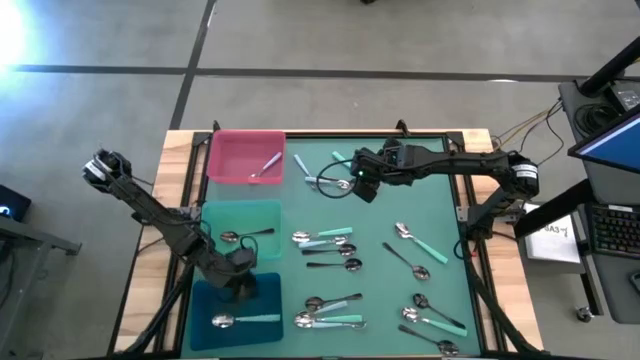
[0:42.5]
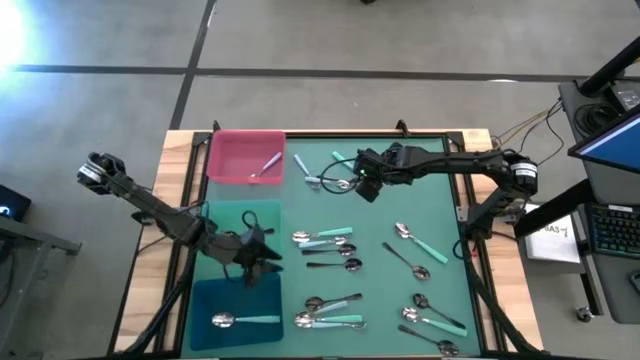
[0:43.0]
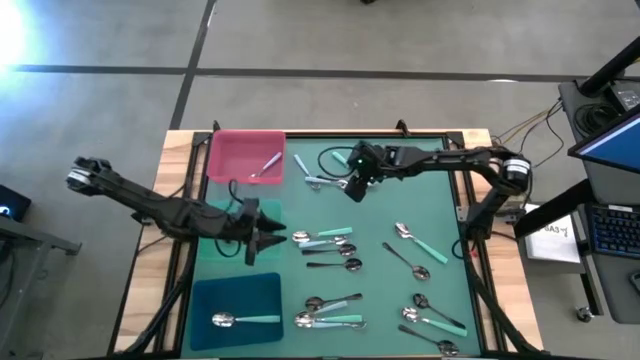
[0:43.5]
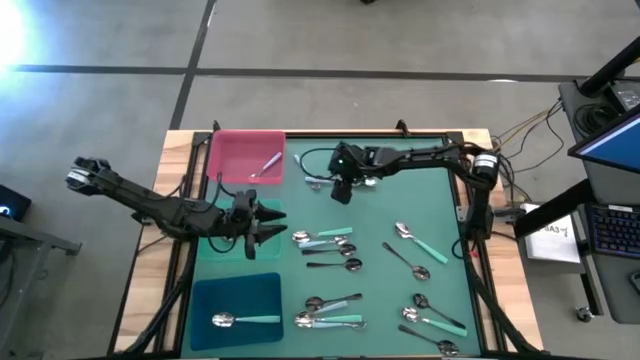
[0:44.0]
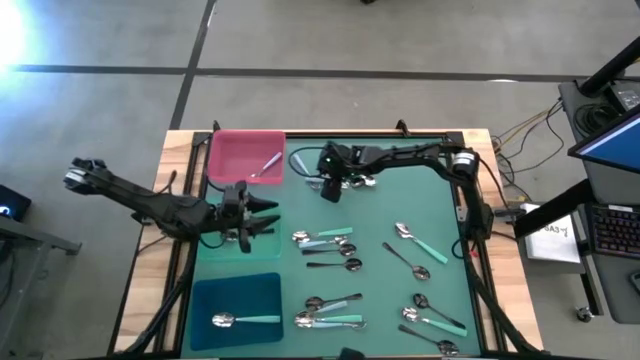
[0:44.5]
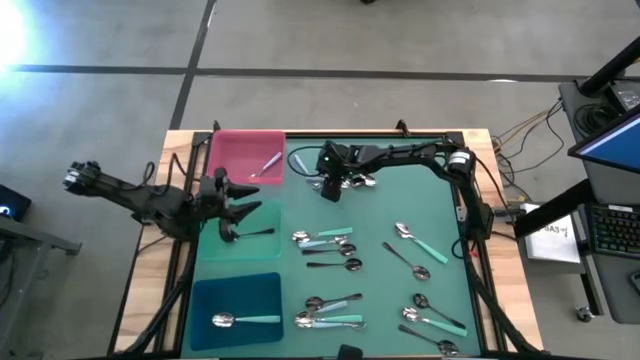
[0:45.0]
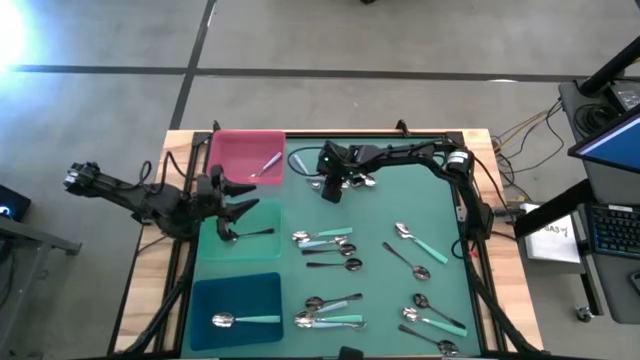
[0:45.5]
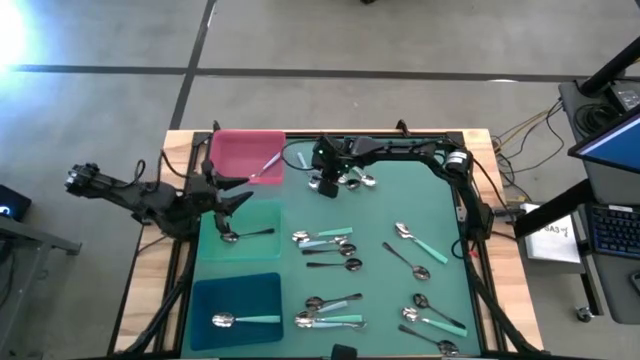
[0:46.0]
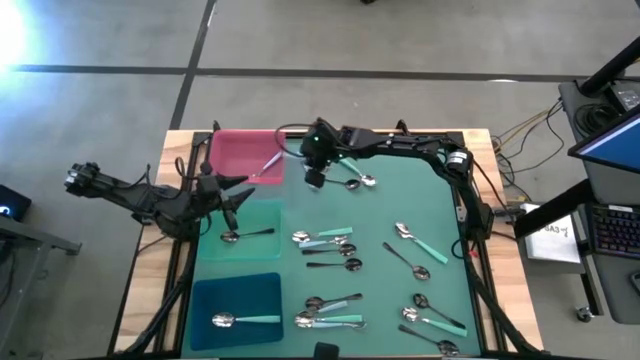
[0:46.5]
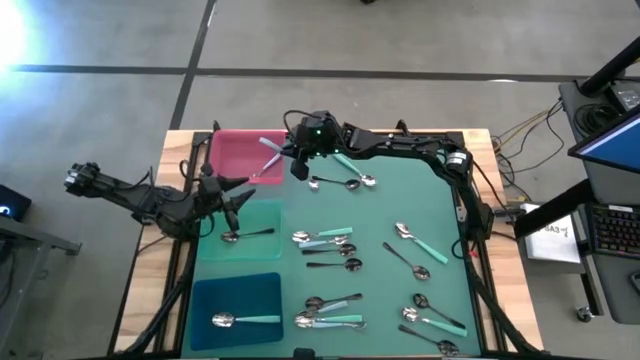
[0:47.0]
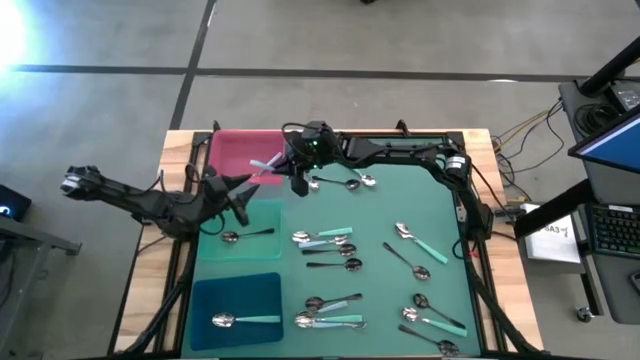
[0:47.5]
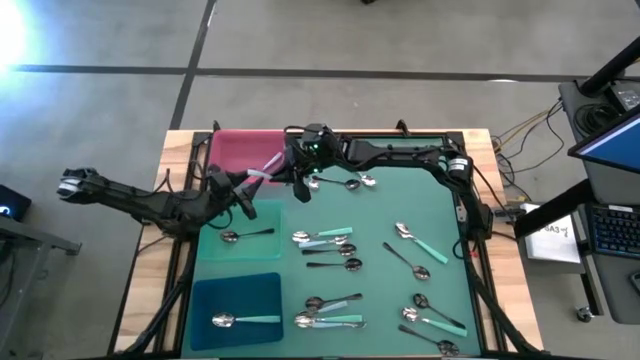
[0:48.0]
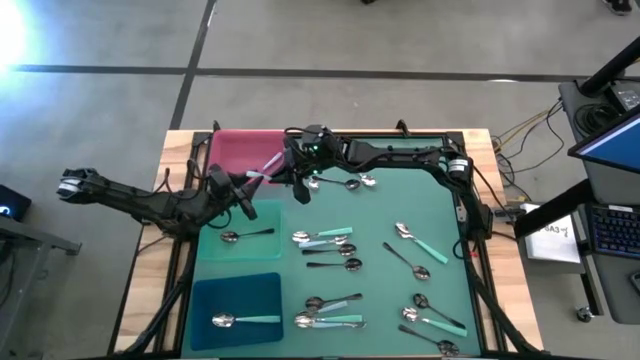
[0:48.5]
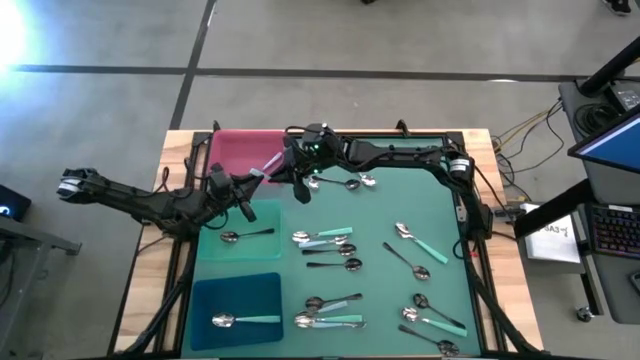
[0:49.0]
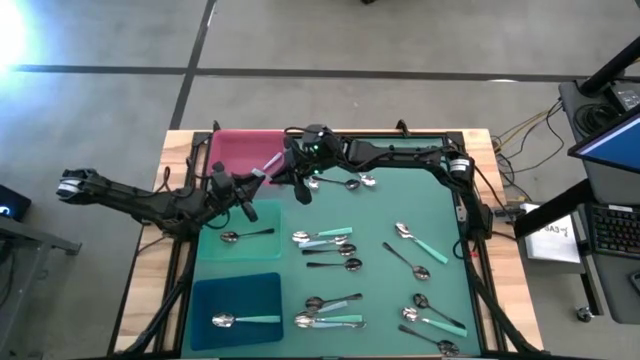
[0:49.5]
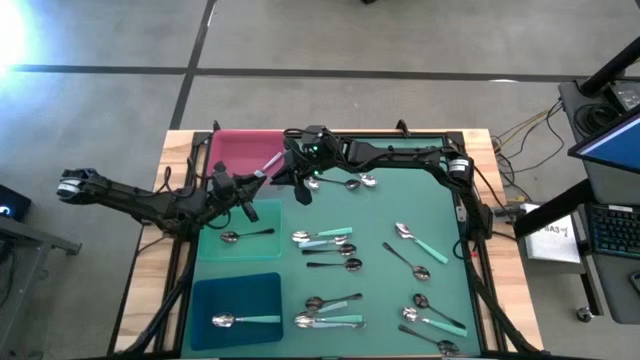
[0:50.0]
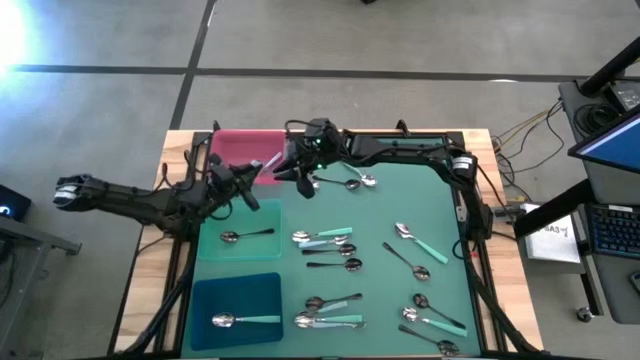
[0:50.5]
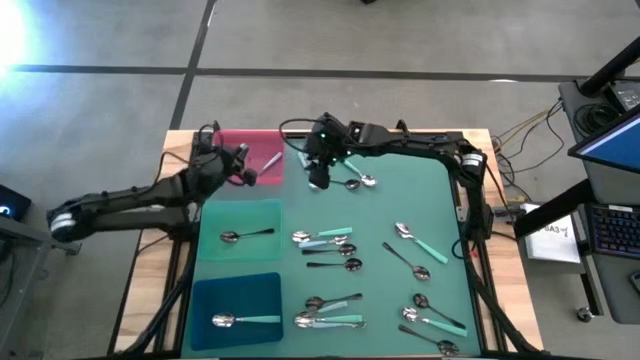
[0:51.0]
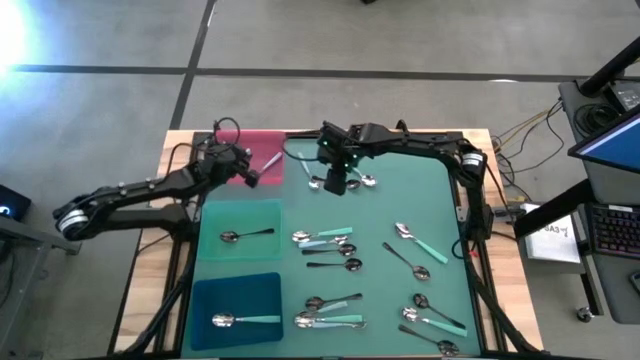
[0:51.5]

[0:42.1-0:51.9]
Task: Sort silverware by color (type)
Put the blue spoon into the pink bin

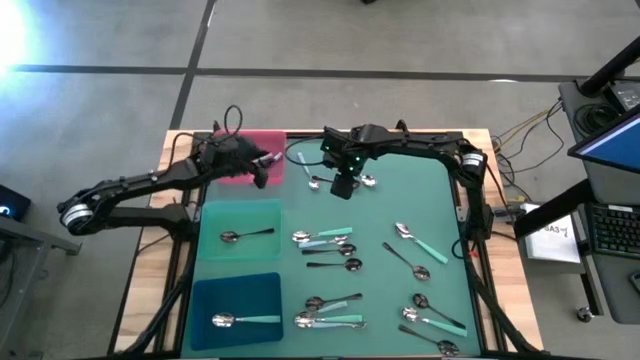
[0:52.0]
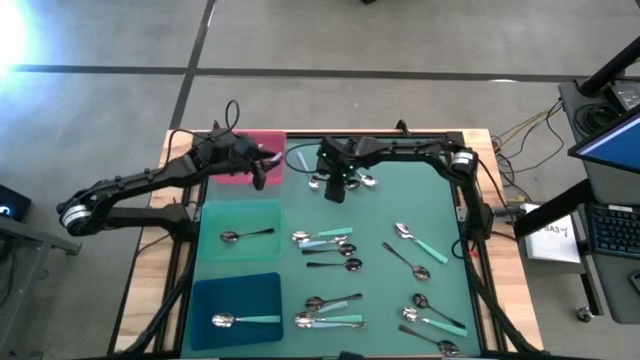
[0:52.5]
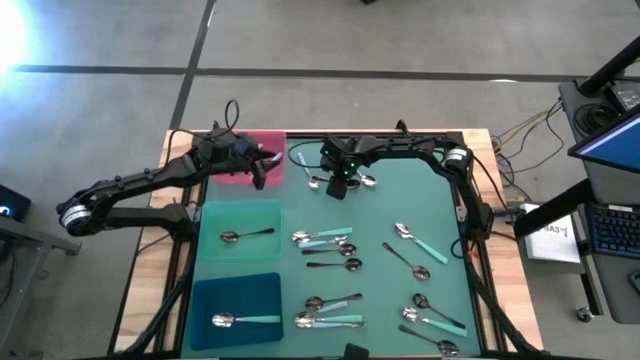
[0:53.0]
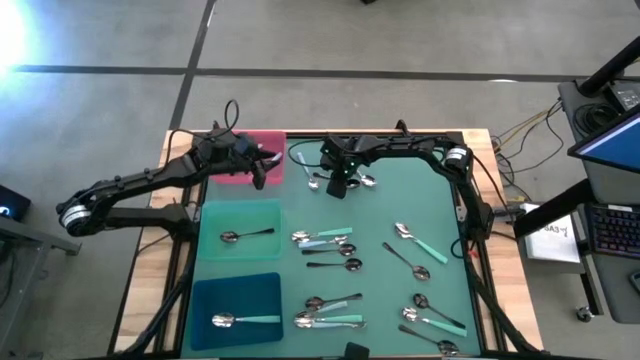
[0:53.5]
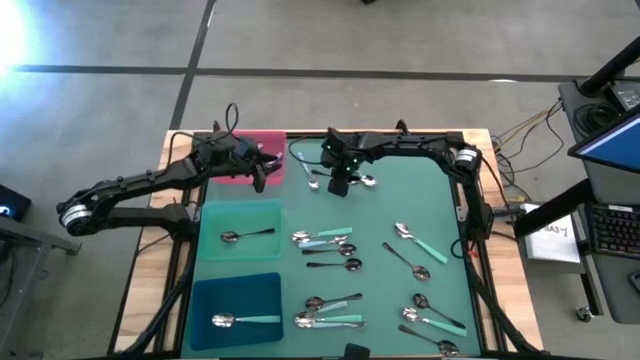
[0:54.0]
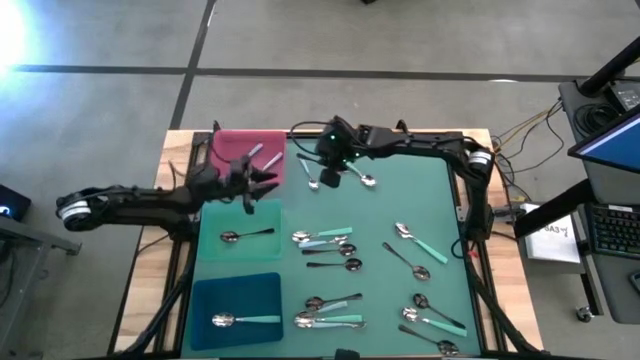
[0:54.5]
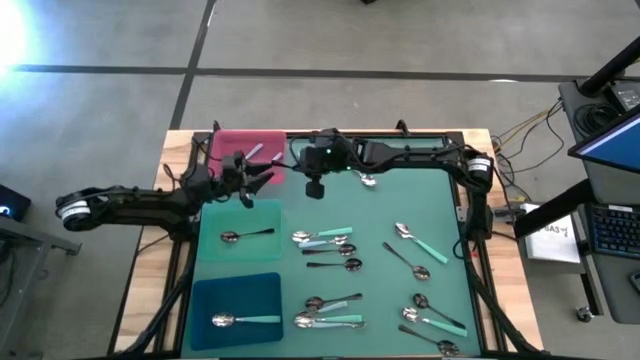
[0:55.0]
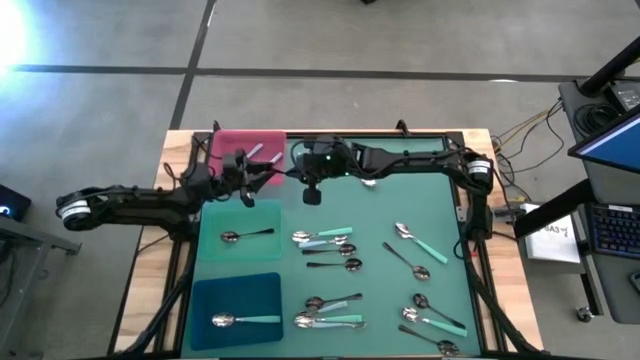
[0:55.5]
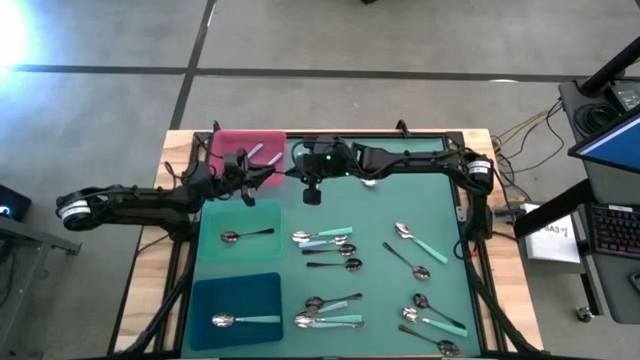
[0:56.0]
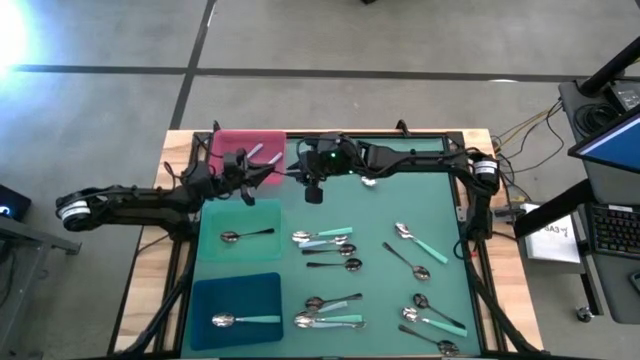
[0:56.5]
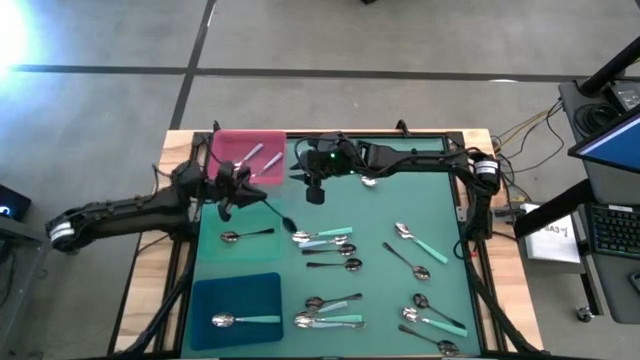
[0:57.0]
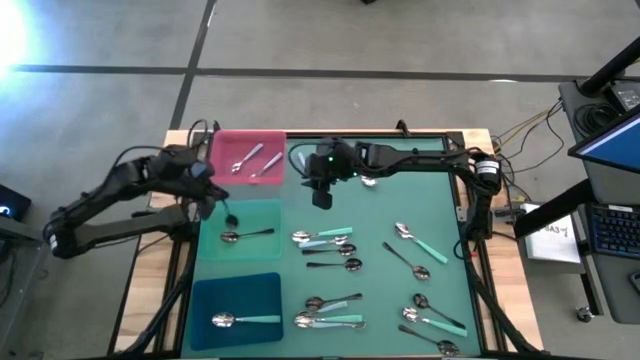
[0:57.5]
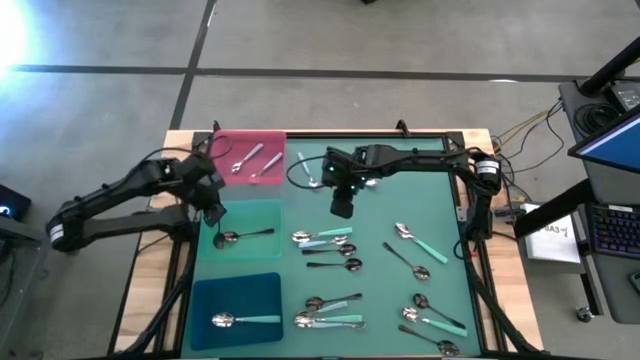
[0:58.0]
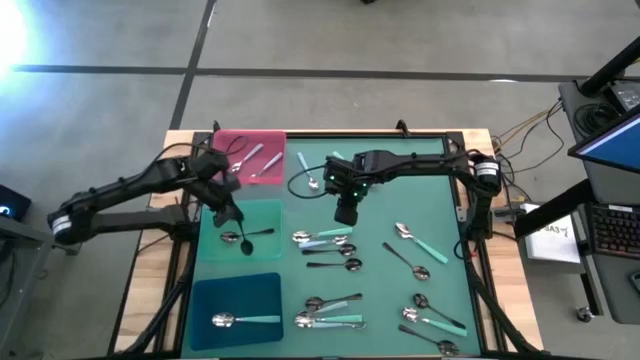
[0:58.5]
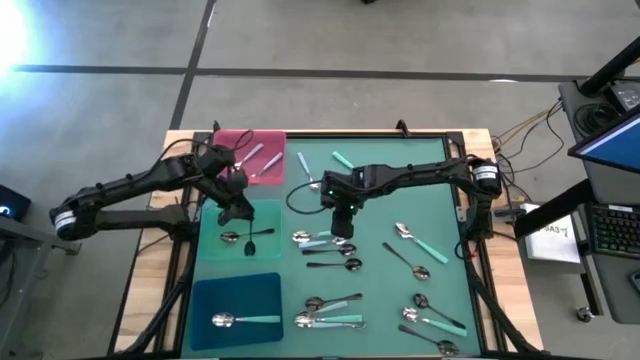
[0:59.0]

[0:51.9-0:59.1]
Put the black spoon into the green bin

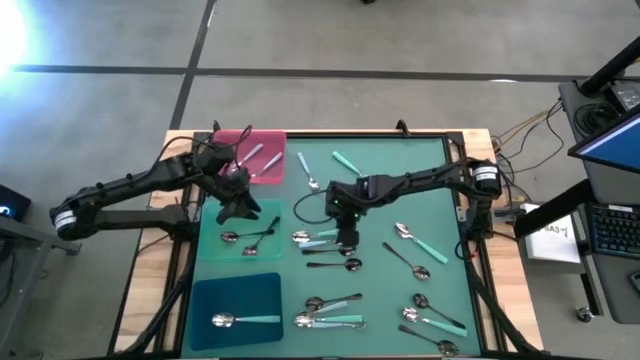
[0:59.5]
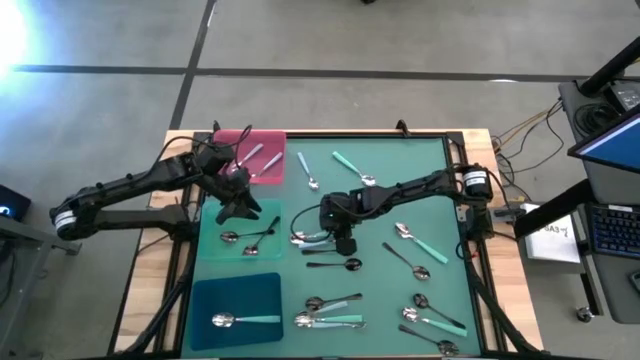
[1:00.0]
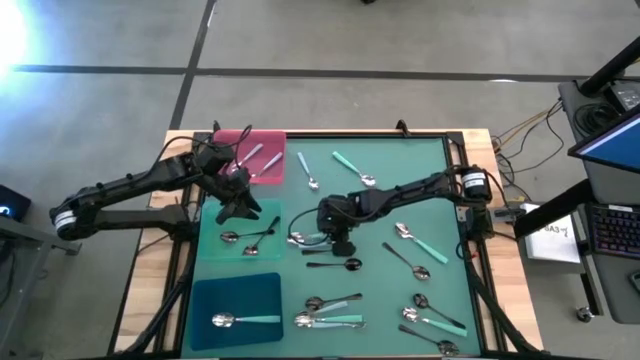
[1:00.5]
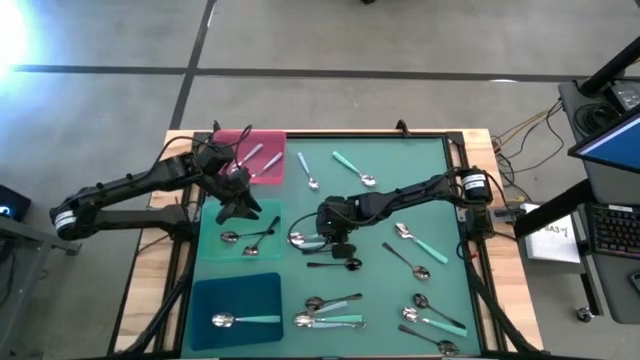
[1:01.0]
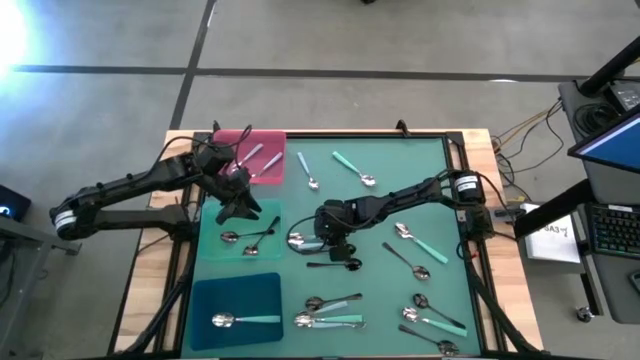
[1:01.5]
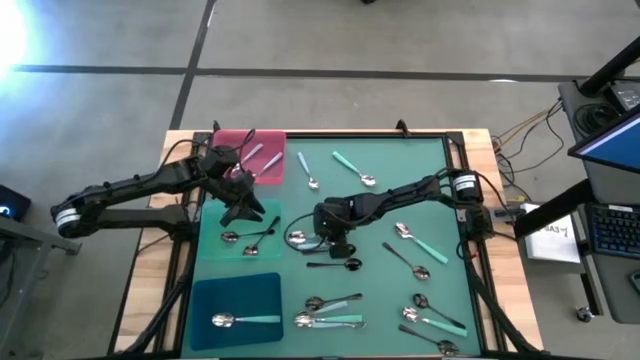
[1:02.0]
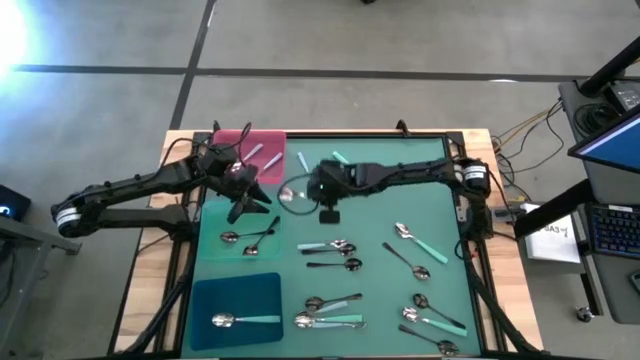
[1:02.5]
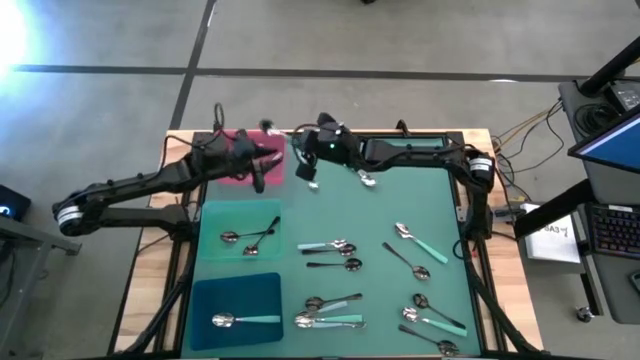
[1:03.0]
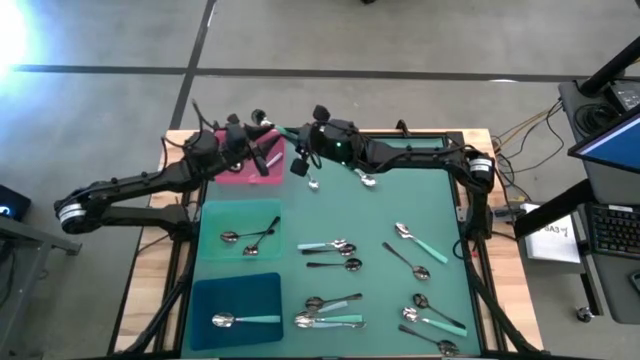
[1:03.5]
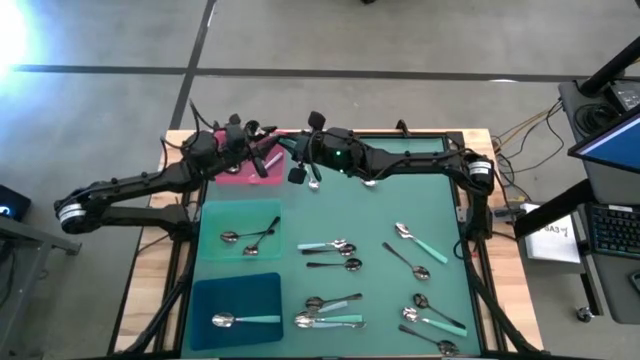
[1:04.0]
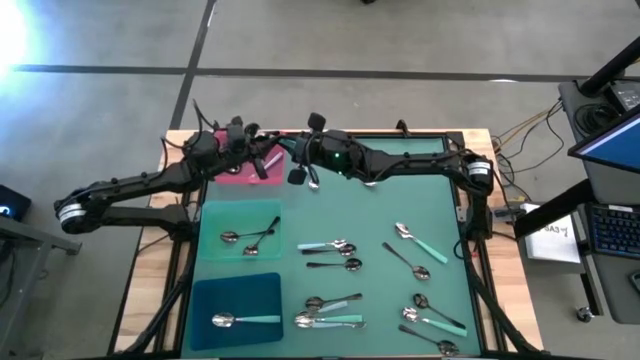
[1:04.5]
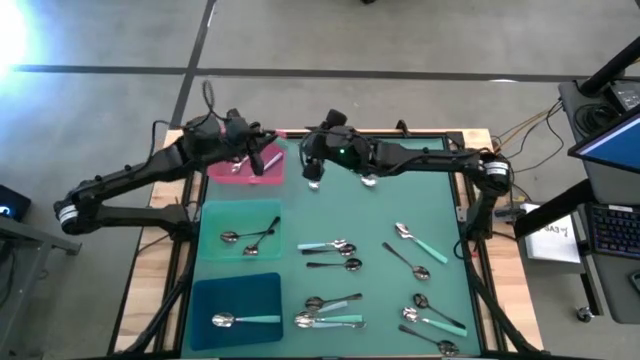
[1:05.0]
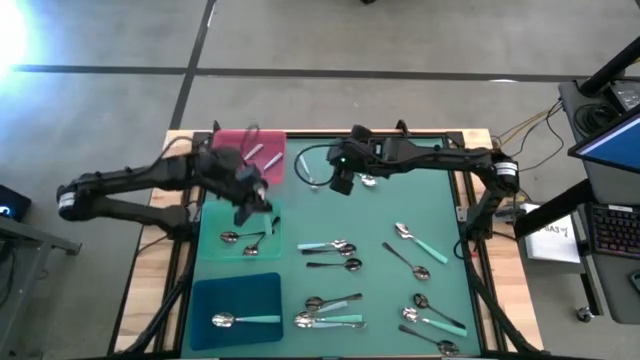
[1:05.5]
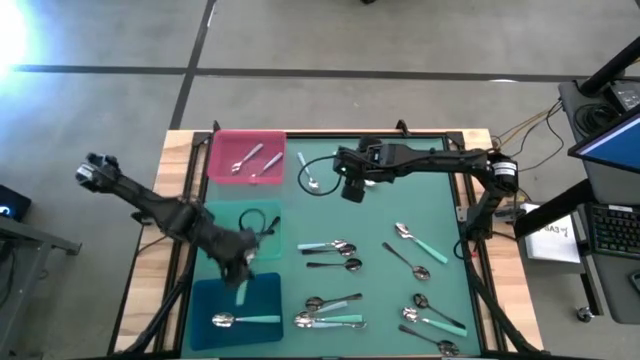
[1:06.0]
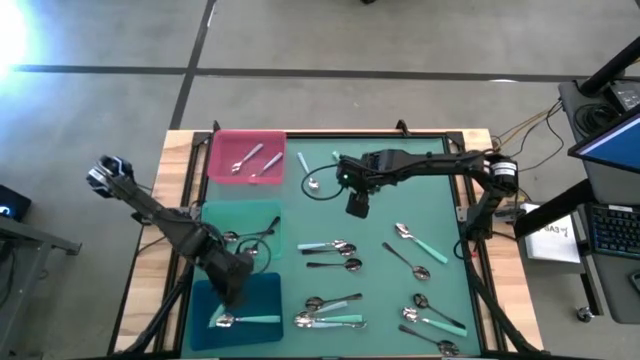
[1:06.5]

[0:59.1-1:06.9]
Put the light blue spoon into the blue bin
